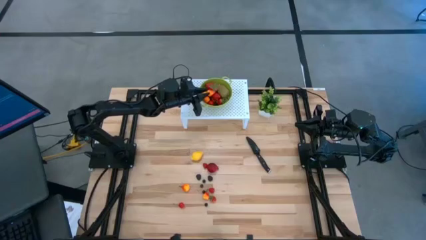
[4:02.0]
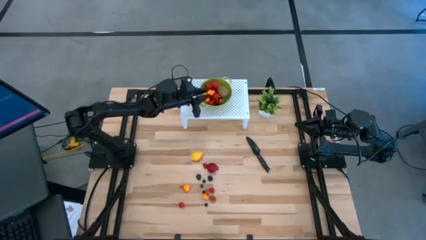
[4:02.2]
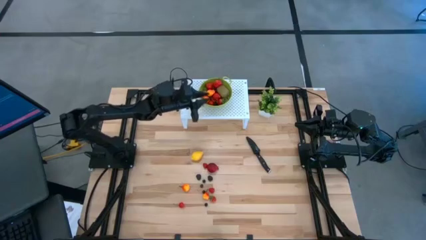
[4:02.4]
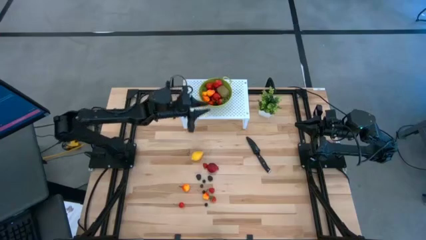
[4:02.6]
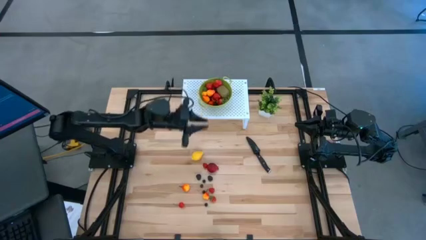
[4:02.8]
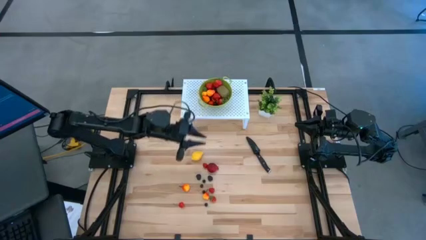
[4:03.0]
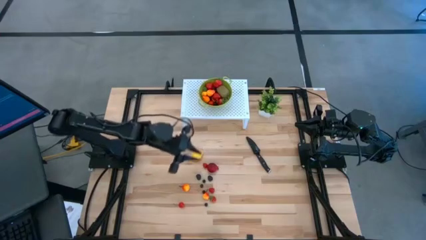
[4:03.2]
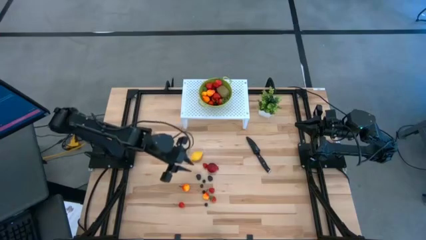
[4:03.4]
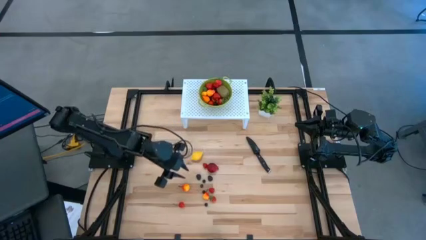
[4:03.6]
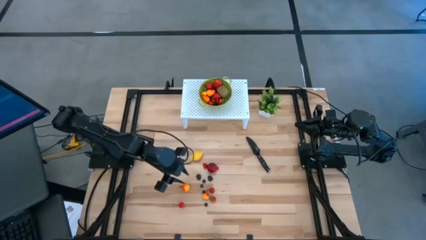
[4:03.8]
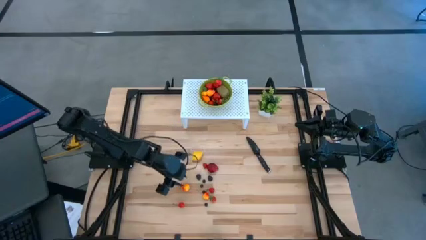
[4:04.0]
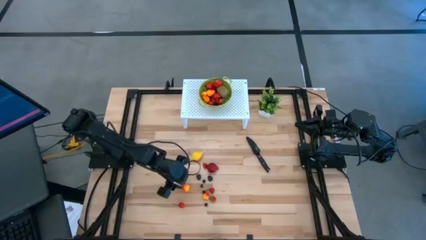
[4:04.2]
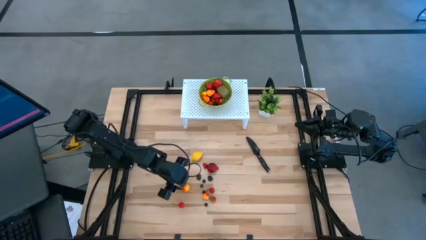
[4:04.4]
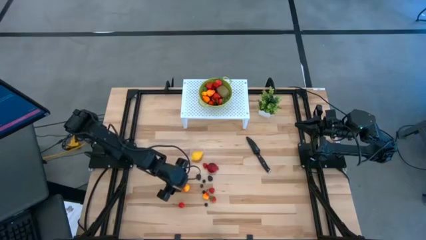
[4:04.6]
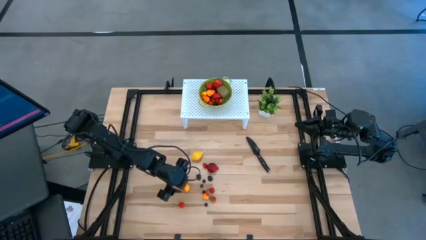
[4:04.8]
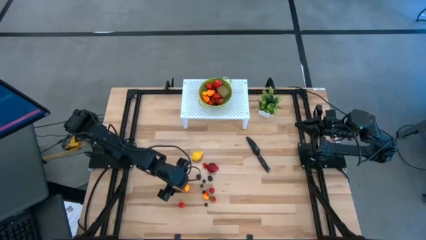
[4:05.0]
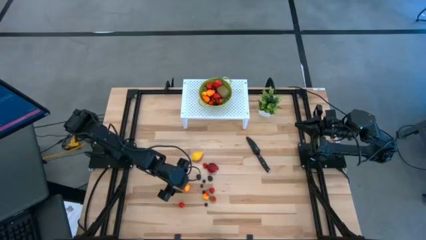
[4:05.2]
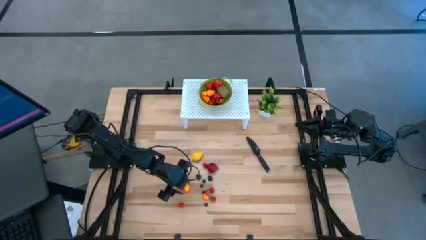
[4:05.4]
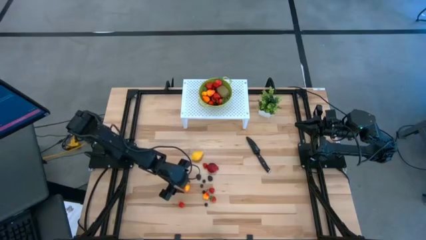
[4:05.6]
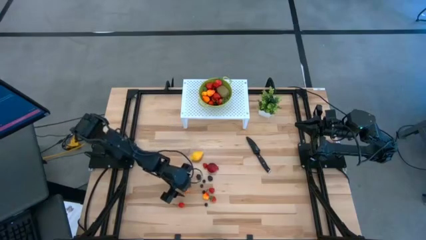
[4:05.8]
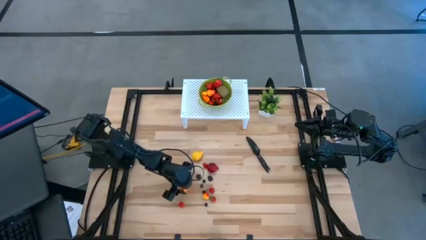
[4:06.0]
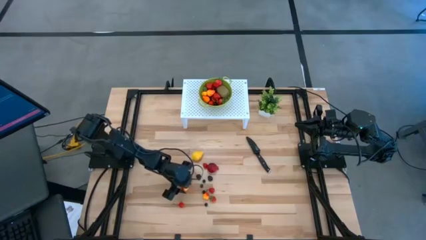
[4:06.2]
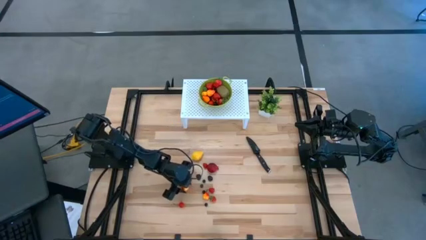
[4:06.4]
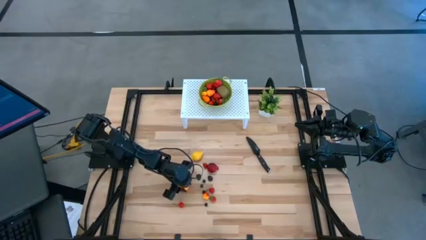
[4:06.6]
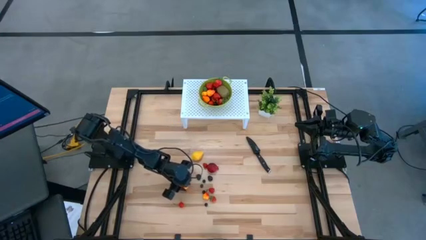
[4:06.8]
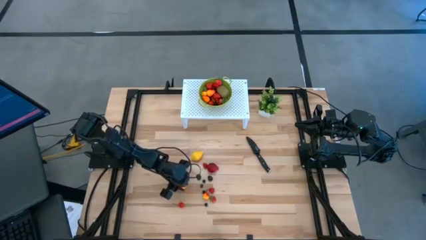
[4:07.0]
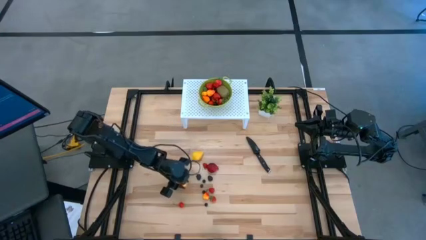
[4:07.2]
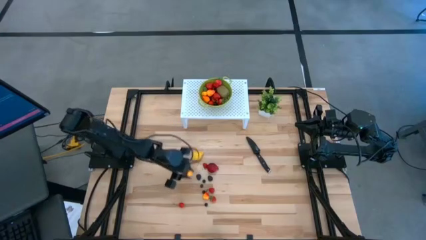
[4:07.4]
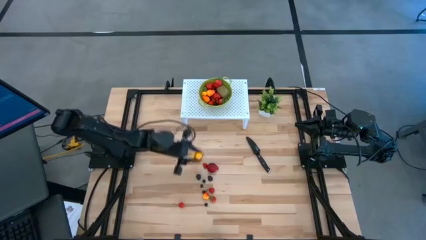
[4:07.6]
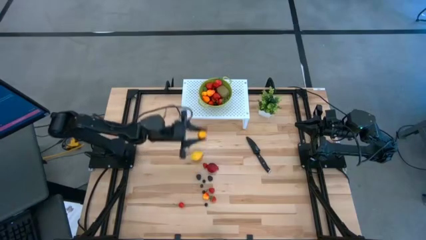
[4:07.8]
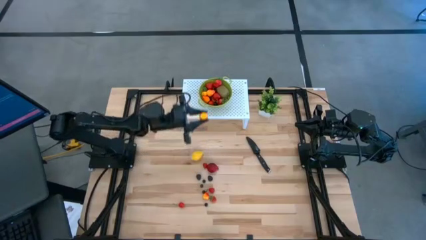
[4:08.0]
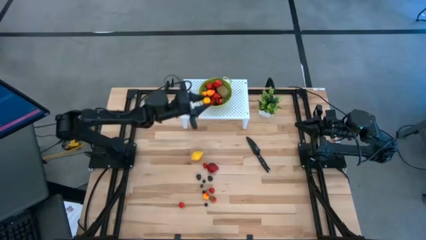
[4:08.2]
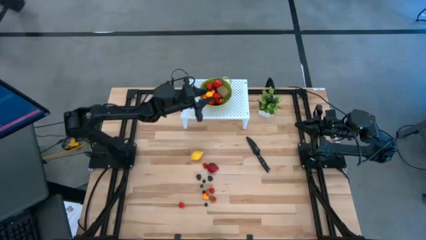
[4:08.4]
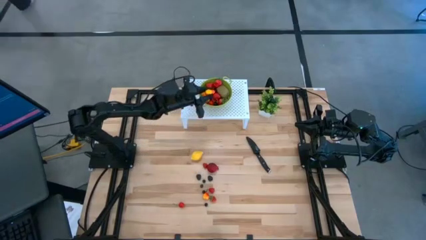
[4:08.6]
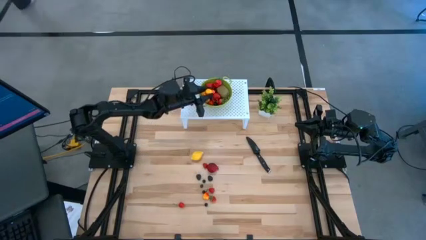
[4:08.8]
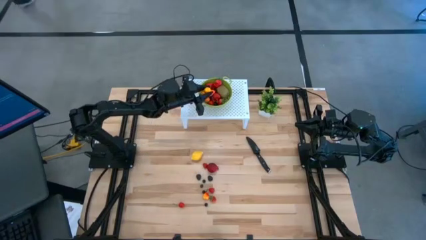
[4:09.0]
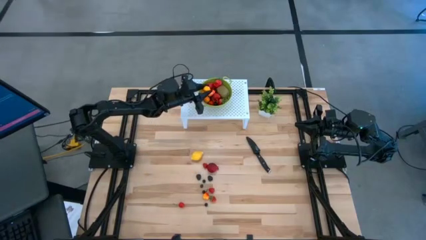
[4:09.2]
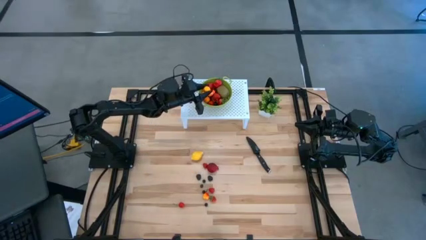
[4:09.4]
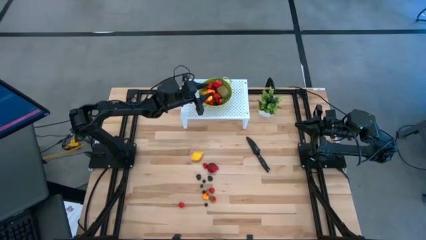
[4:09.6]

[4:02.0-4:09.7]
Task: Pick & Place Fruit
Put the yellow peach into the green strainer bowl

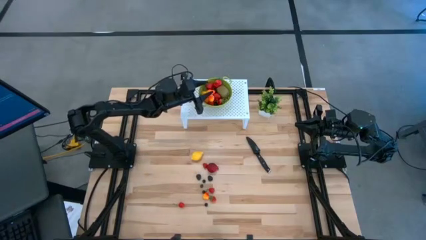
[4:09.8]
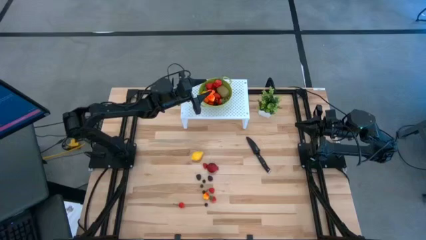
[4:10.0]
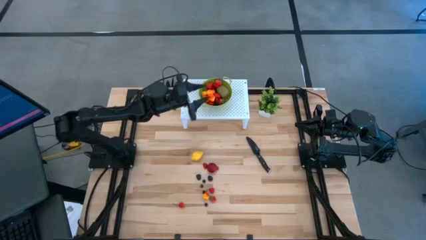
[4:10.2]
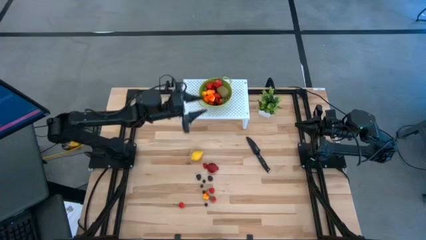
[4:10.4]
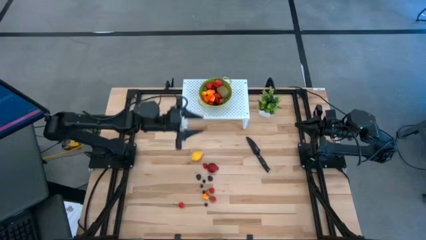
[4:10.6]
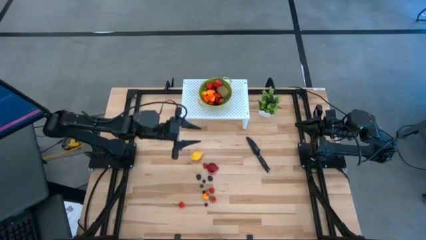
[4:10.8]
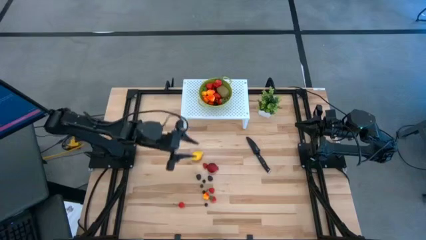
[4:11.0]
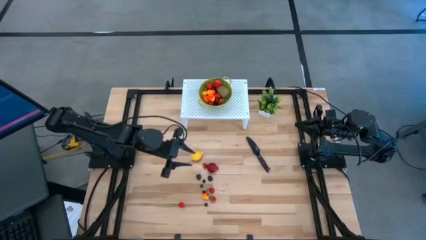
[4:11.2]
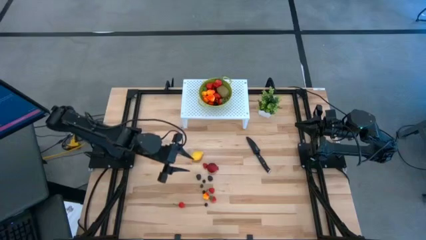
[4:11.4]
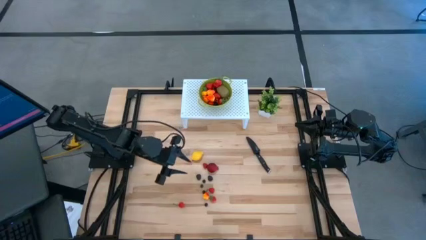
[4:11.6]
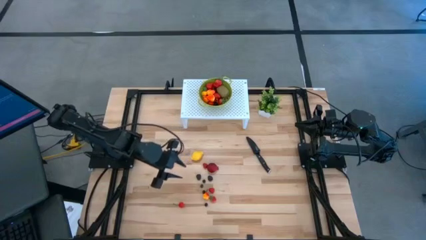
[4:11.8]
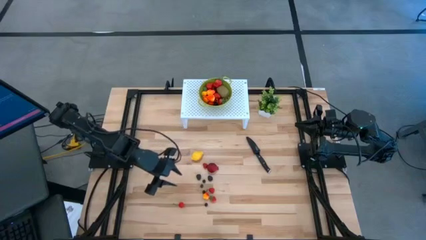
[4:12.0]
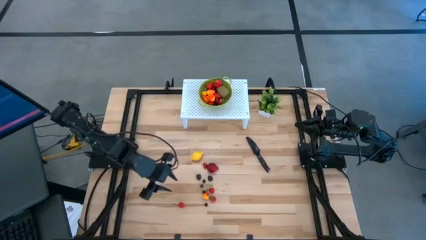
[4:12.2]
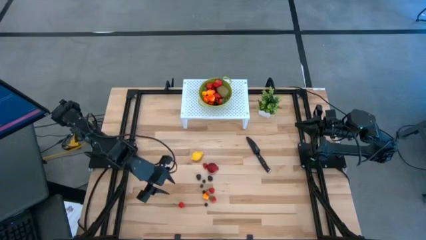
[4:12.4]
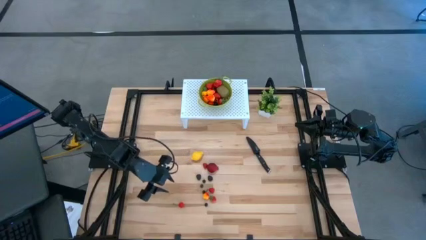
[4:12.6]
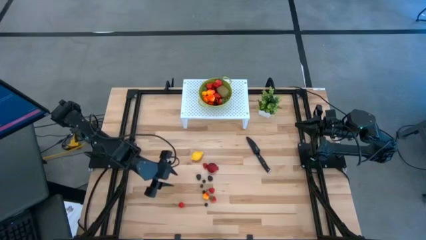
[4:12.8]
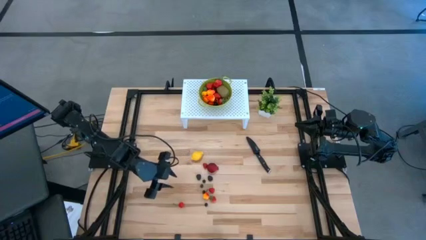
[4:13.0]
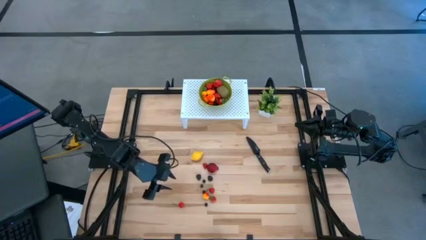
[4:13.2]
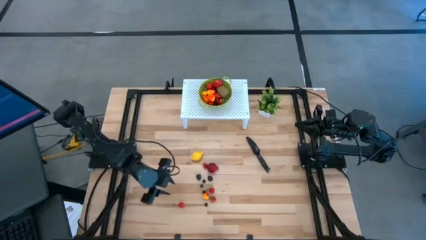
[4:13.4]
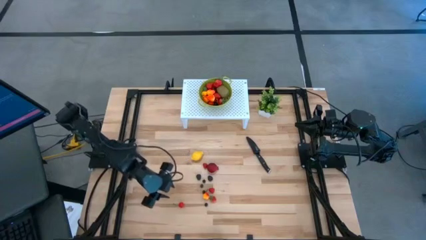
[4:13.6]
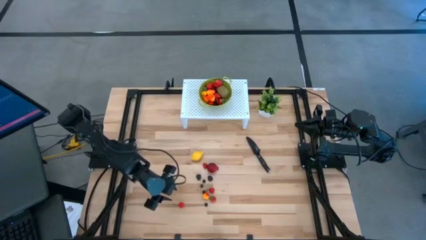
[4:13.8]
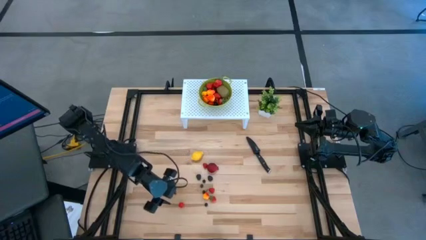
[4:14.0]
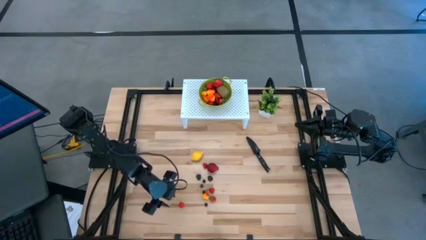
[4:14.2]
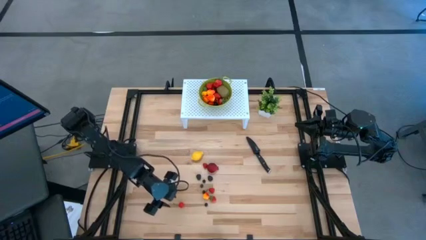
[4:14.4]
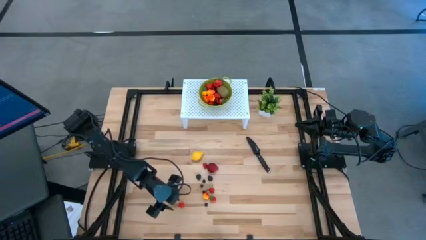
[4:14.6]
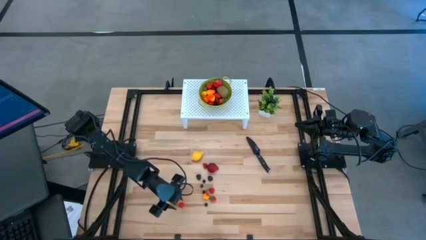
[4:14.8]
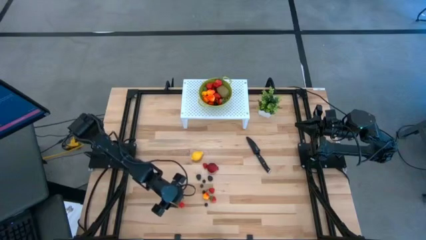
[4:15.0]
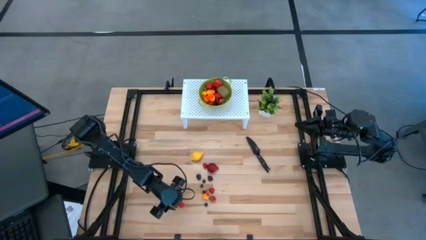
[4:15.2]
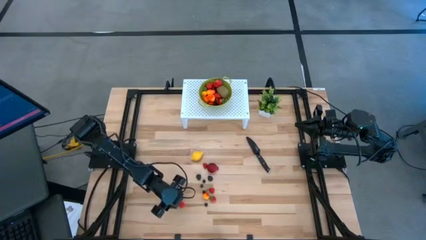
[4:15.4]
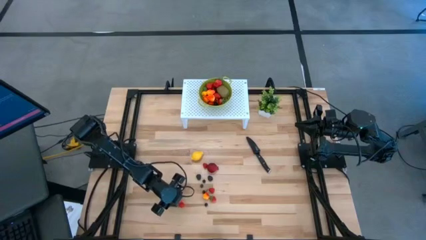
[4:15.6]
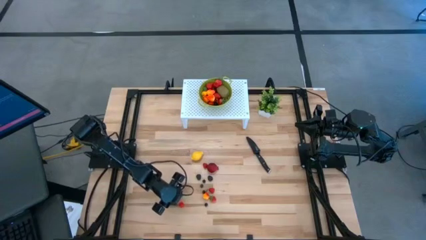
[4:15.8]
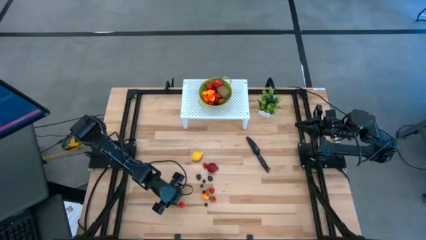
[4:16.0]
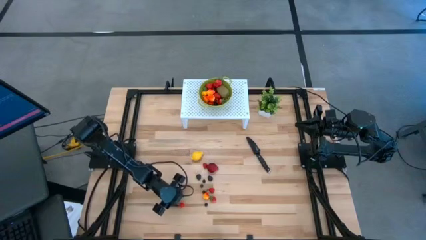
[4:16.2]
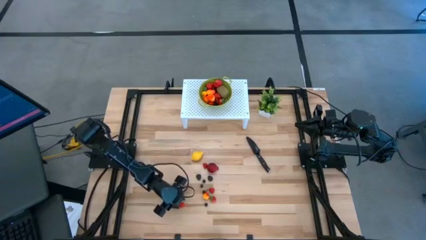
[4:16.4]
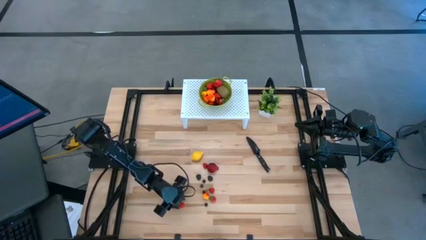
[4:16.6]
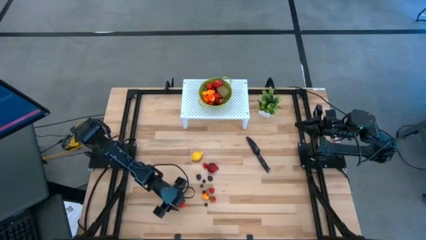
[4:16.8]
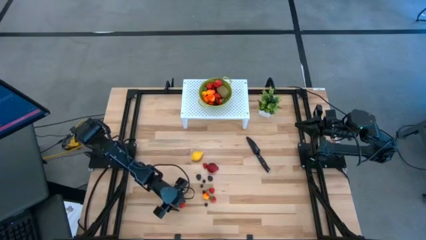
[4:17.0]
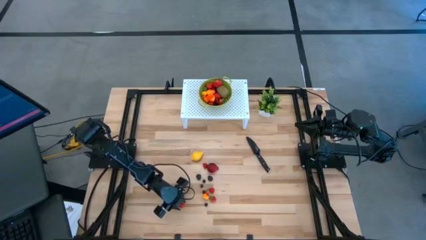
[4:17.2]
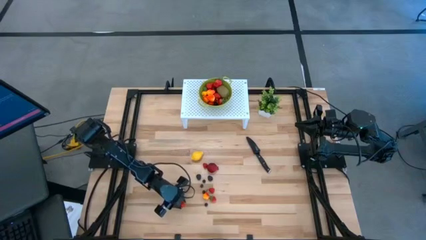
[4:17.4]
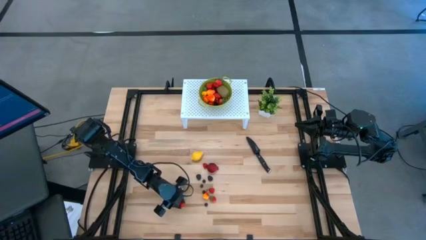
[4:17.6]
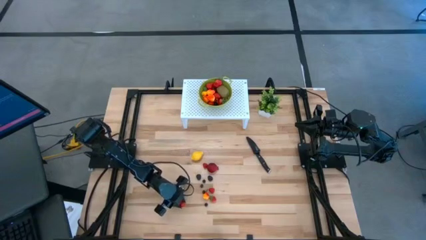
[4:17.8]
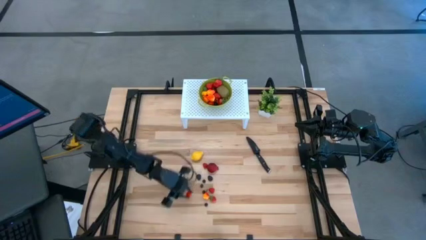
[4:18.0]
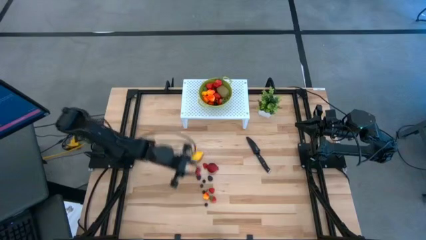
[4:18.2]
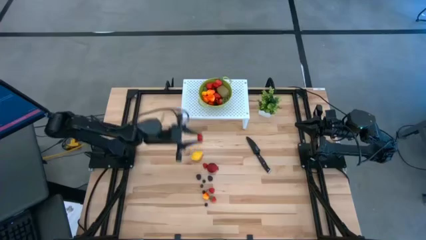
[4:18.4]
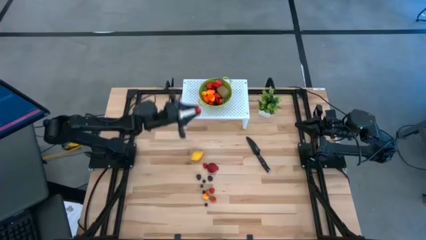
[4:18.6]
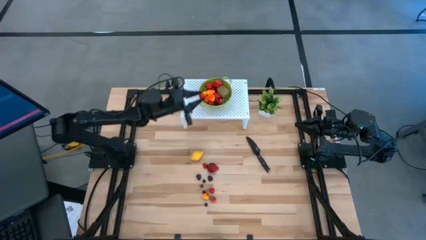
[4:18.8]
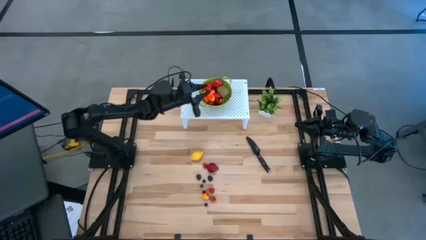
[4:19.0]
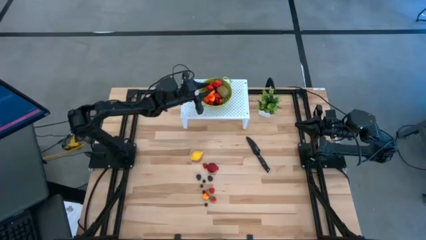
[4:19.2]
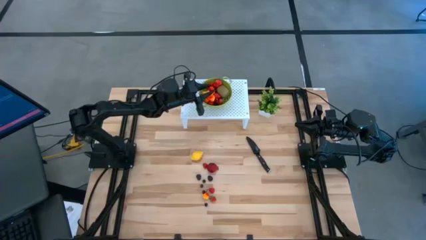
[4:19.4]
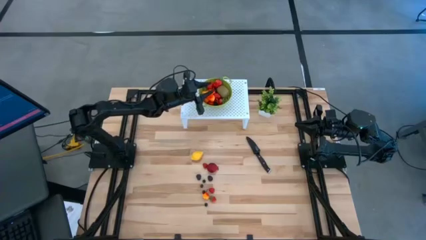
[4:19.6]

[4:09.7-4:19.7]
Put the red cherry into the green strainer bowl
